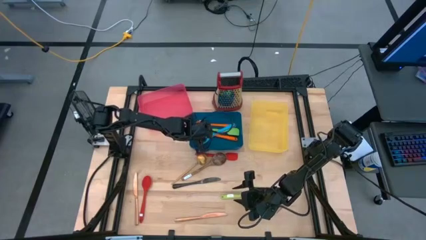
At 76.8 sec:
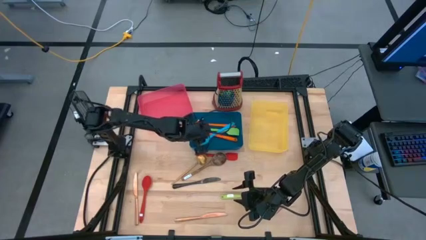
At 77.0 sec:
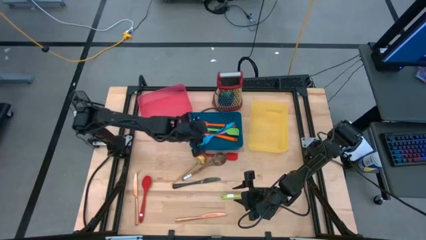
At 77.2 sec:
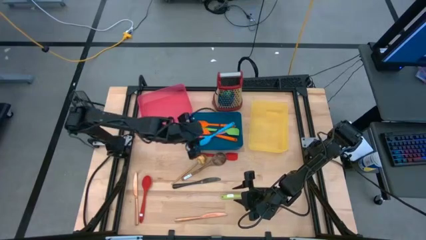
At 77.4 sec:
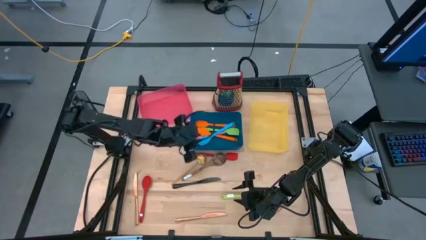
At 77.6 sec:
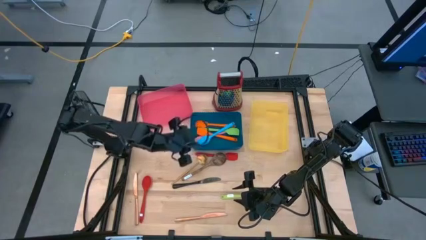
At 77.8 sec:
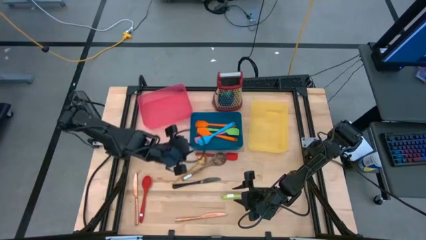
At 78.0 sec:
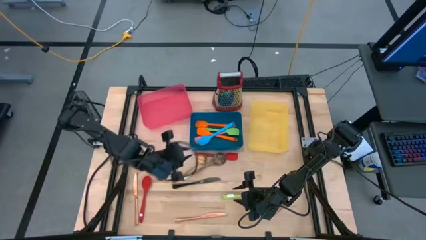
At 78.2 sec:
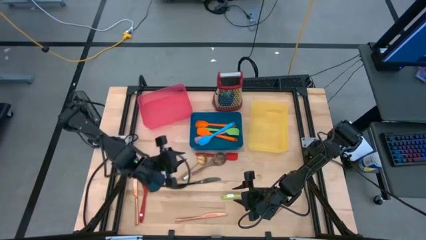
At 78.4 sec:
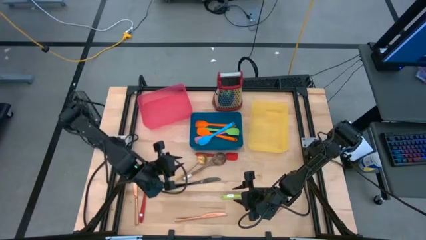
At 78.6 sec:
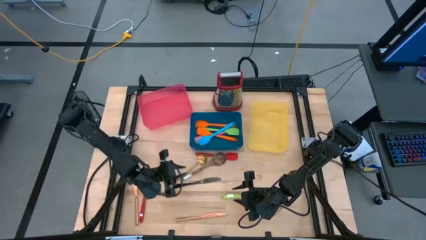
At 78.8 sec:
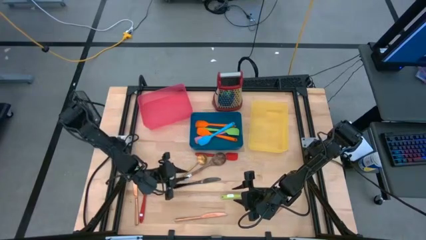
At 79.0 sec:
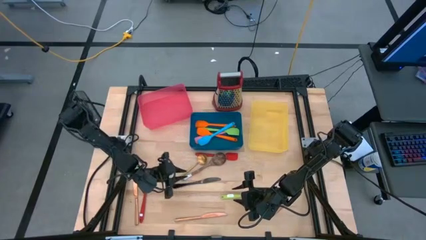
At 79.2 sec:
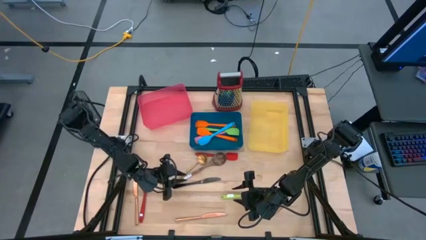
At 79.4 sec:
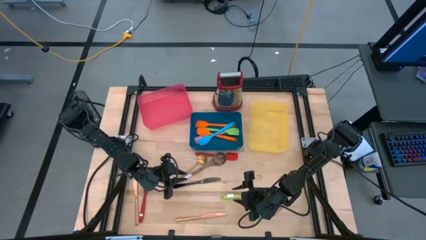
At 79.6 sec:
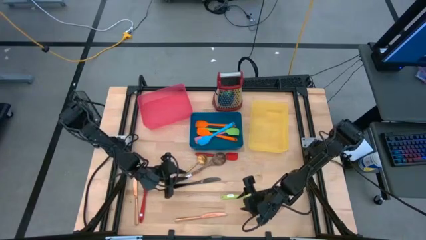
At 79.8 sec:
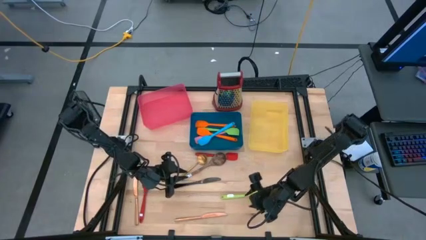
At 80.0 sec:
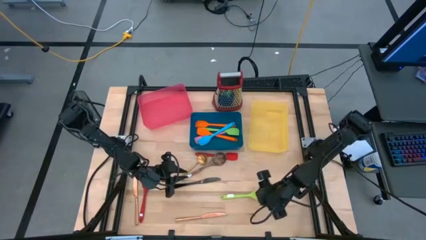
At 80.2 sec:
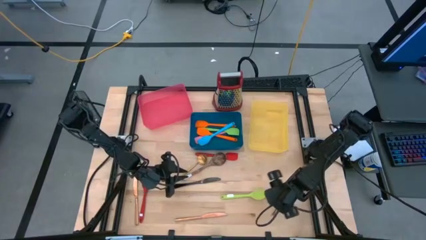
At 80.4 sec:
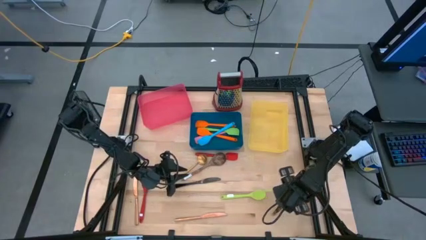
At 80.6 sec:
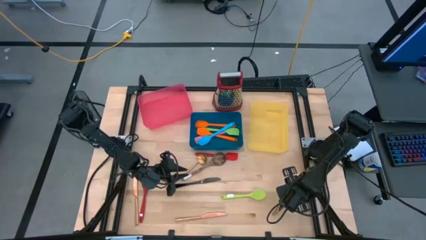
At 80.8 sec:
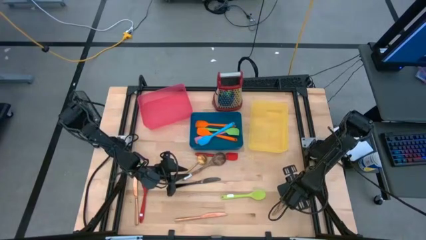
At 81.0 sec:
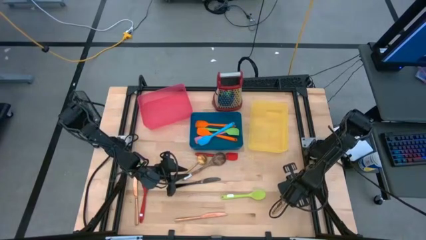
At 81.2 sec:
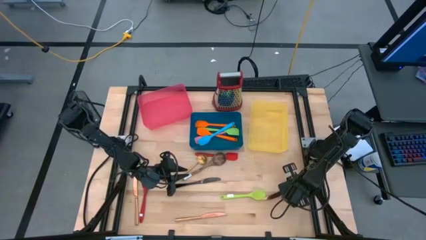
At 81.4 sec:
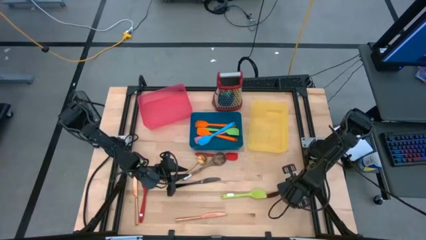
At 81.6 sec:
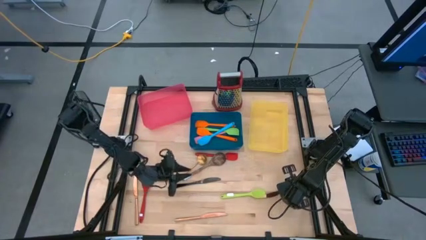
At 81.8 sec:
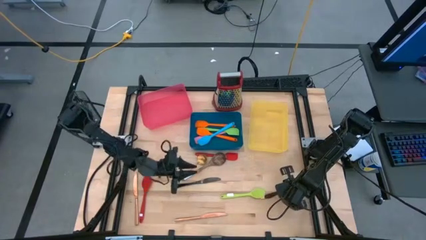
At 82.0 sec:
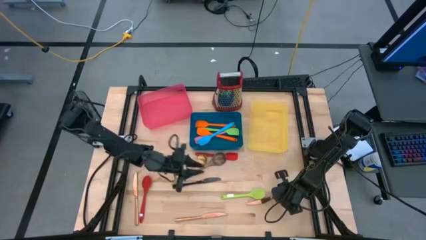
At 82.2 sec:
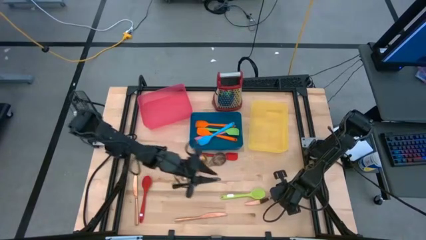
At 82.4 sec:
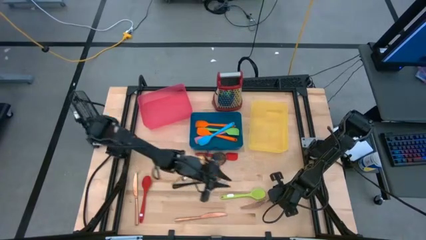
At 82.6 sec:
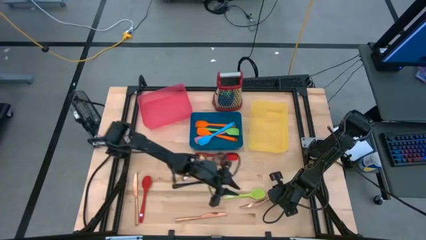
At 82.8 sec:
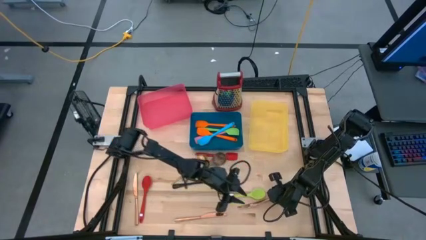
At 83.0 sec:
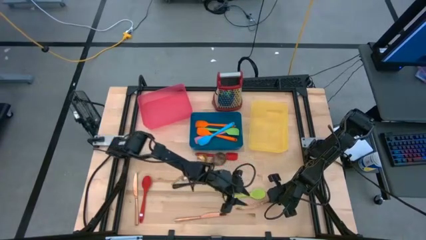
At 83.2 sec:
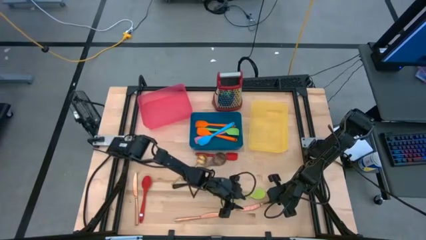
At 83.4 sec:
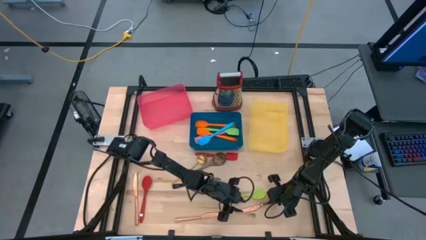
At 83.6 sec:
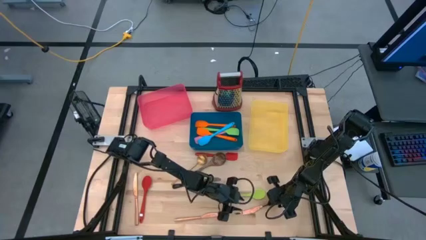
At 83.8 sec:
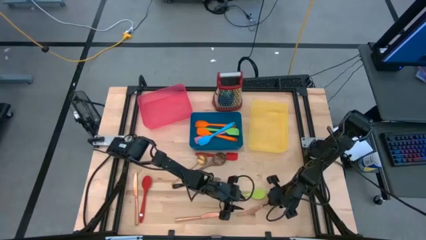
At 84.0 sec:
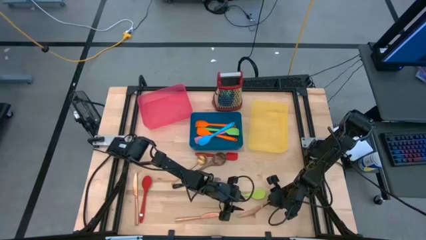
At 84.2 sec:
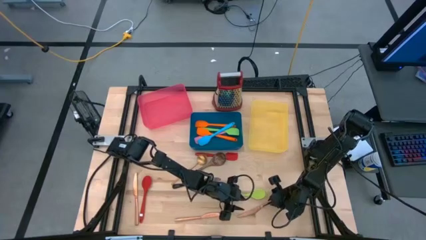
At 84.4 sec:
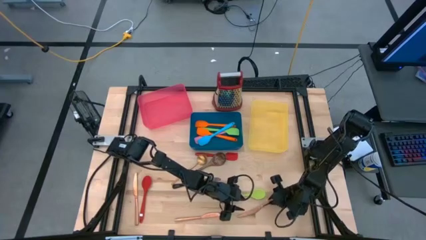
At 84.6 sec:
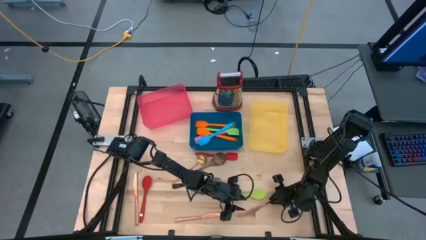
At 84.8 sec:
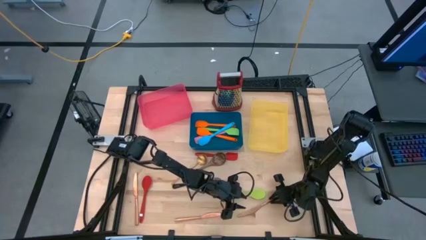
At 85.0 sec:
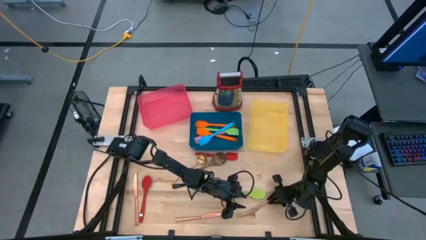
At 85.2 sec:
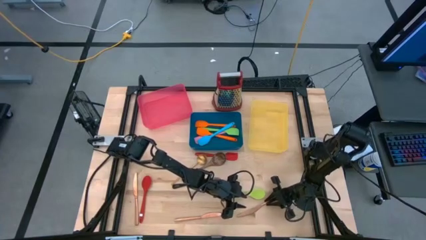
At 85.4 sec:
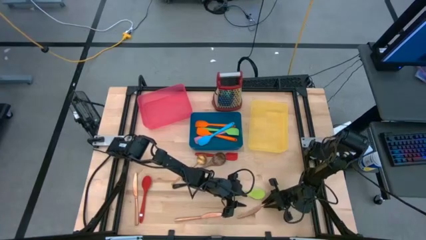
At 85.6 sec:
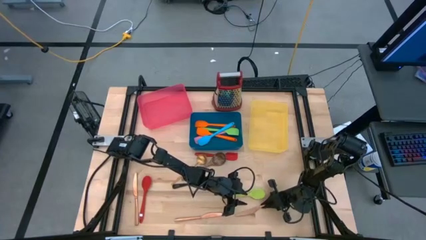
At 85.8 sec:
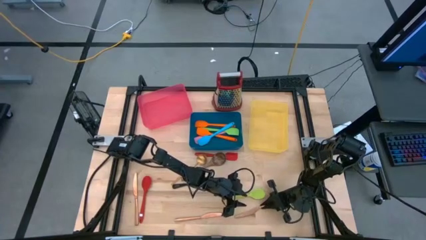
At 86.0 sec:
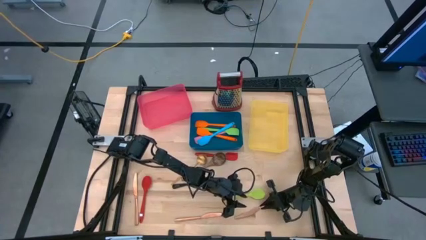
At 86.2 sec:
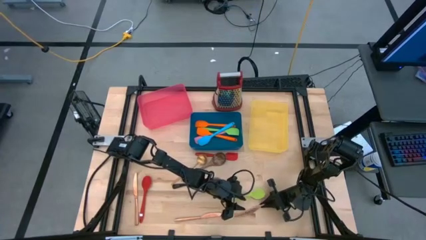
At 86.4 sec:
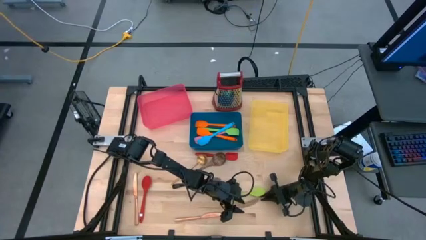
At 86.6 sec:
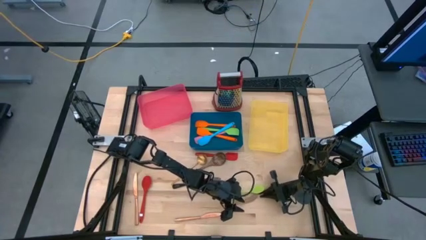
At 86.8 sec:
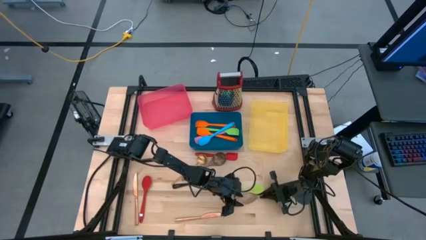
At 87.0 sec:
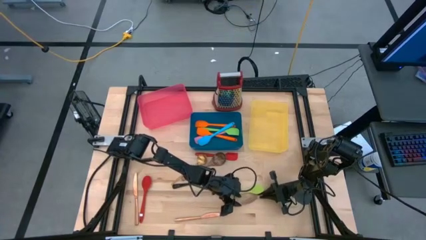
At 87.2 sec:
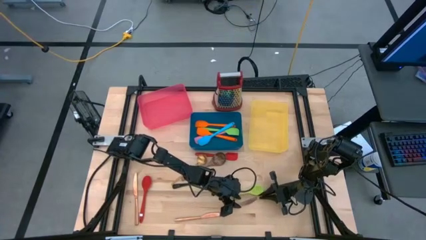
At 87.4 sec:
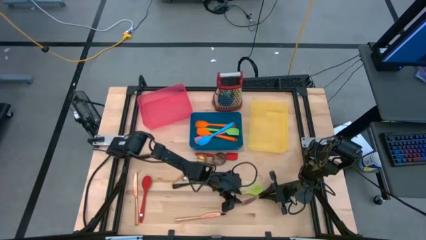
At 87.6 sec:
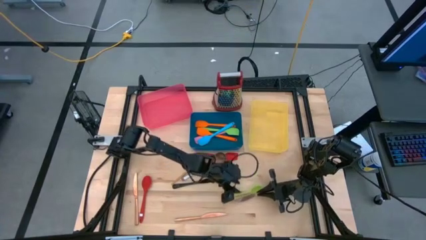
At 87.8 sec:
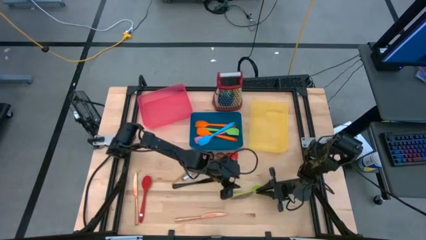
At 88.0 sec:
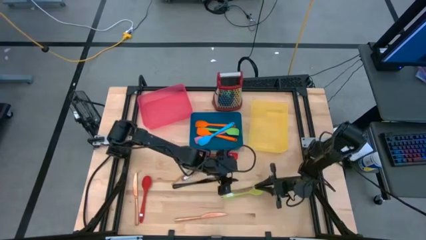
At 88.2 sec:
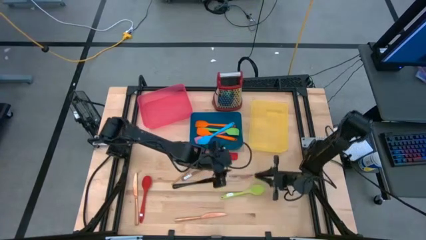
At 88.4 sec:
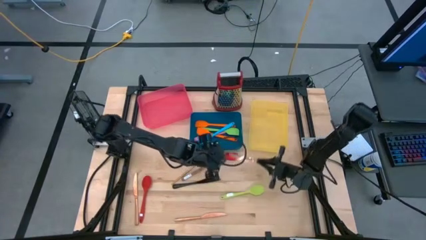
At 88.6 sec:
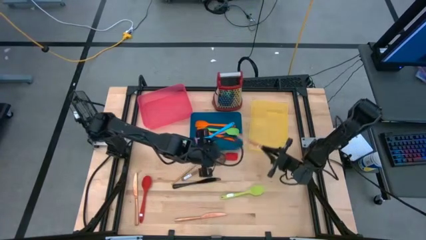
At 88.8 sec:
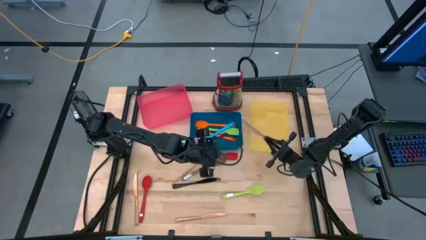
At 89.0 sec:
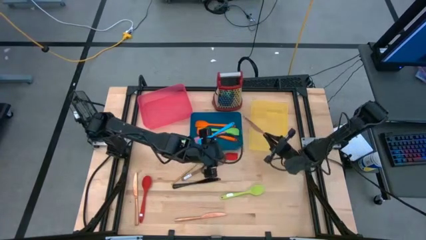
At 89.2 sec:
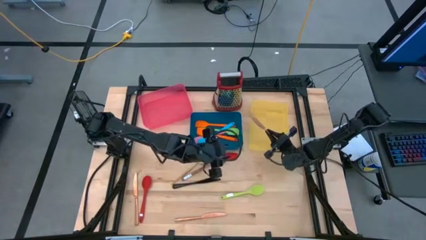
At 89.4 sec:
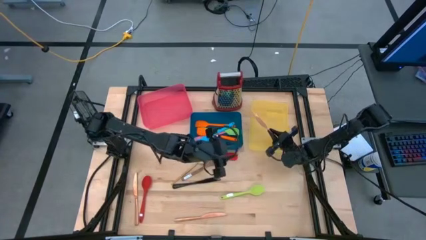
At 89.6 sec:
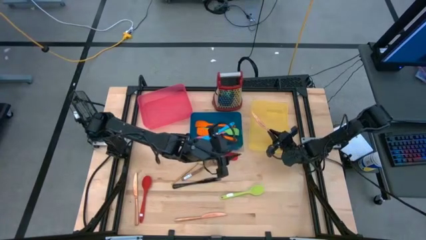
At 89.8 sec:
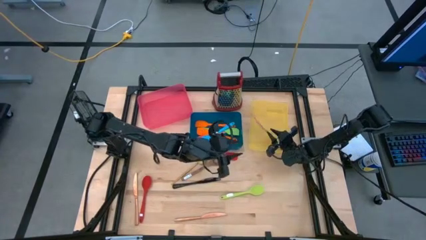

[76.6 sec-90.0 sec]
Task: Pick & Place Kitchen Items
Put the gold table knife into the yellow bin
